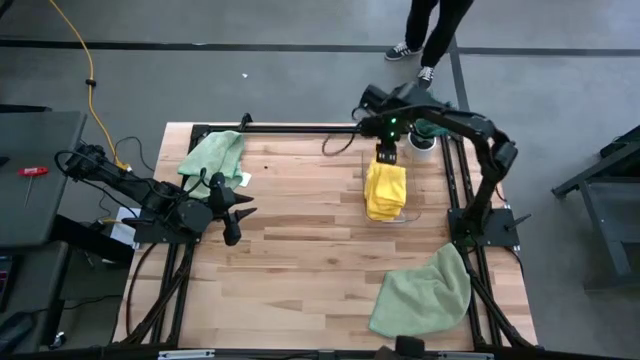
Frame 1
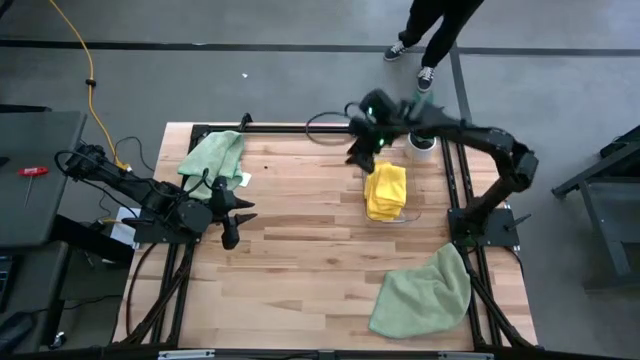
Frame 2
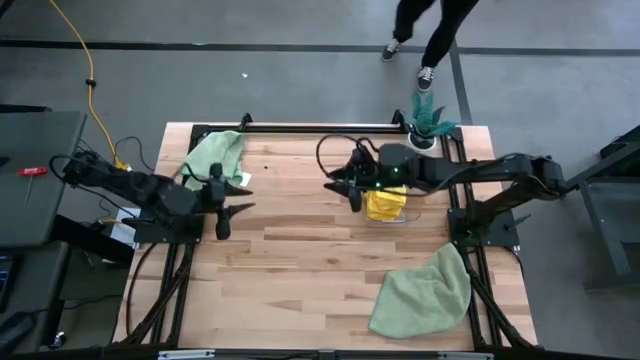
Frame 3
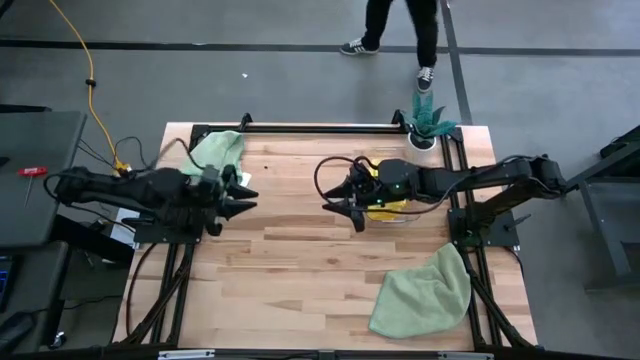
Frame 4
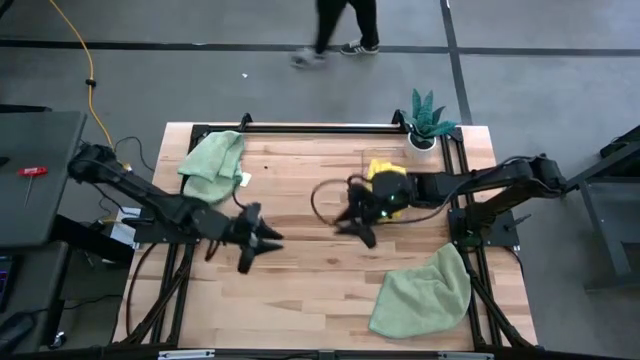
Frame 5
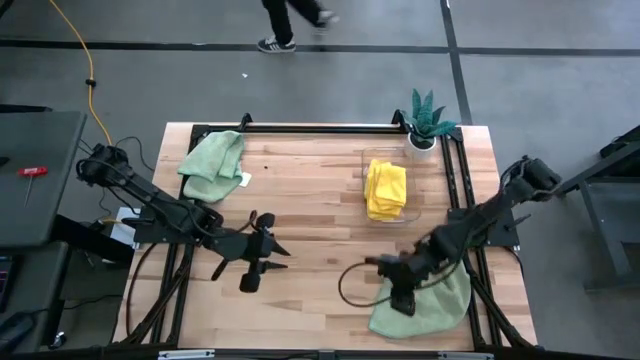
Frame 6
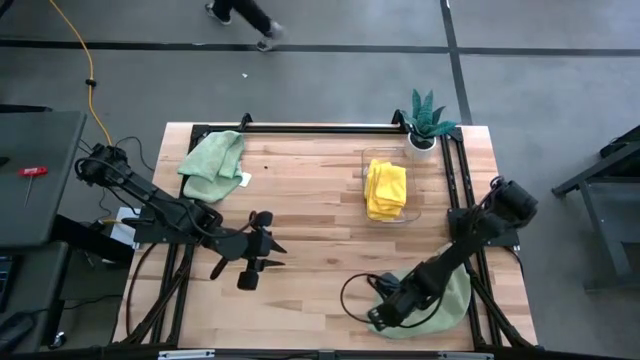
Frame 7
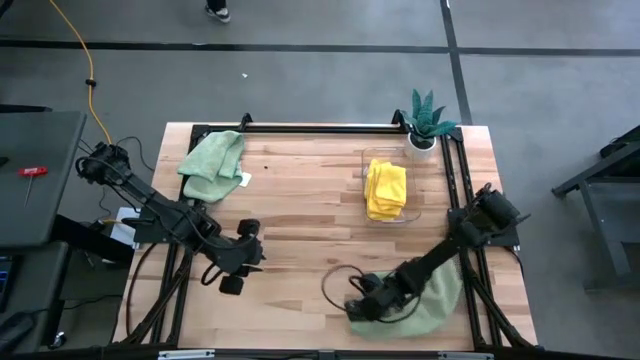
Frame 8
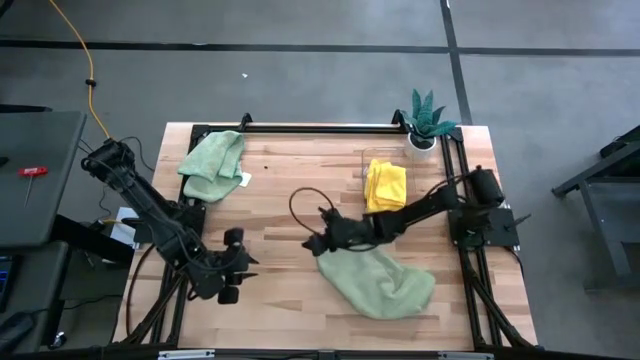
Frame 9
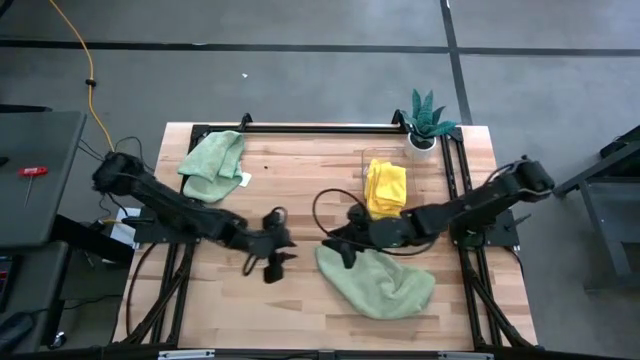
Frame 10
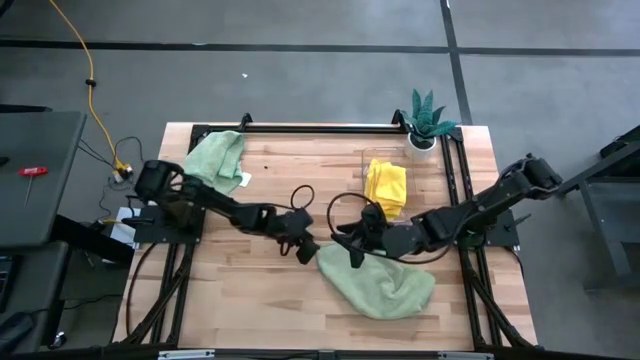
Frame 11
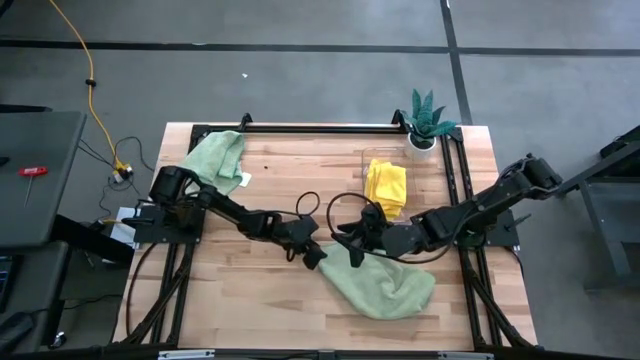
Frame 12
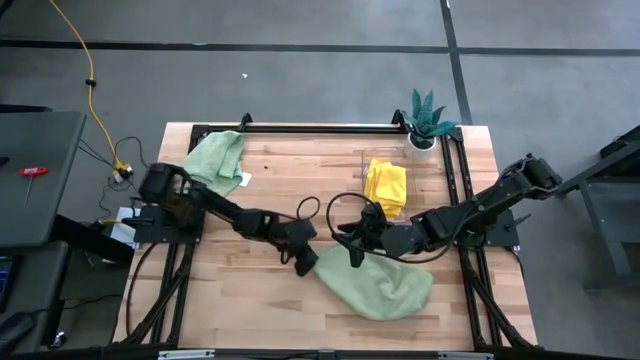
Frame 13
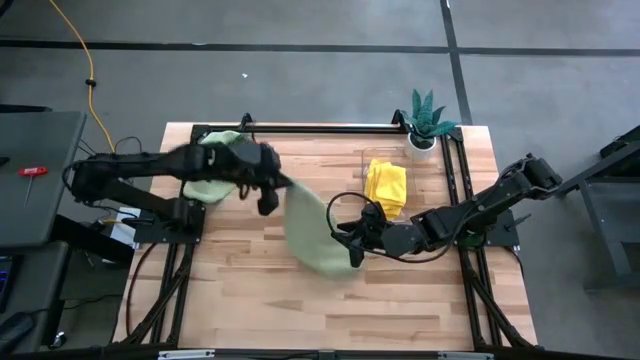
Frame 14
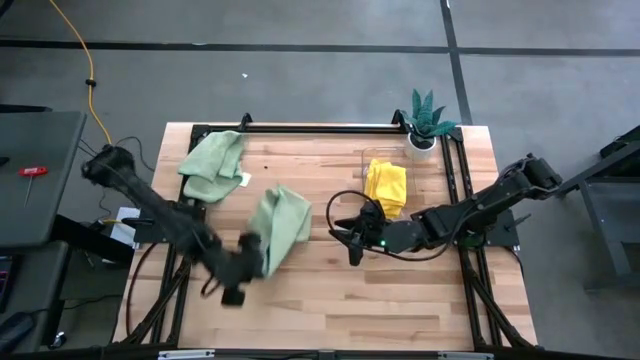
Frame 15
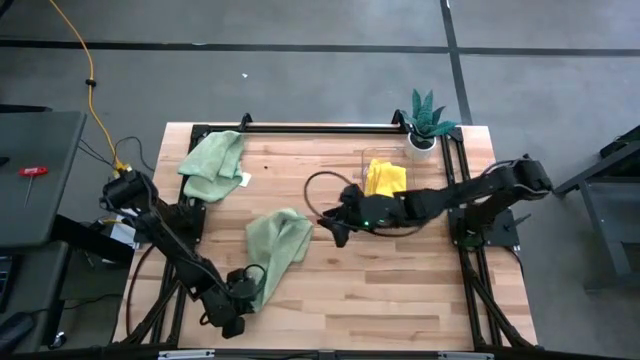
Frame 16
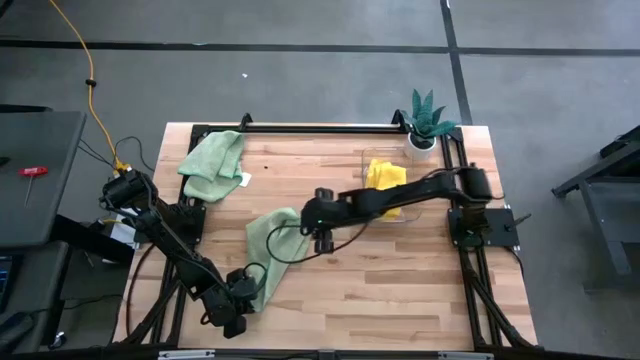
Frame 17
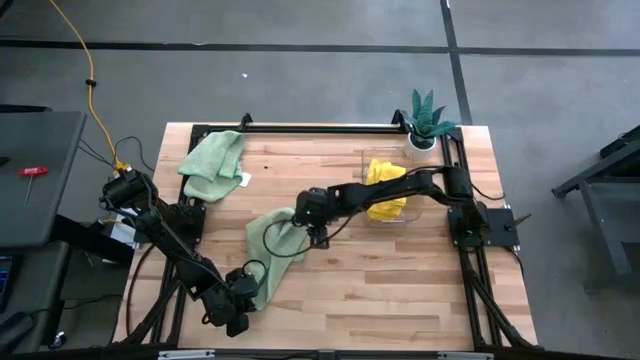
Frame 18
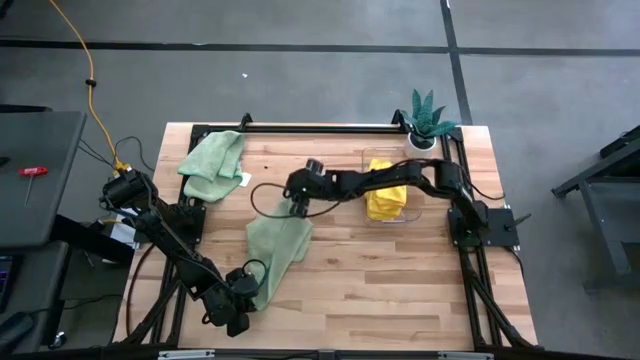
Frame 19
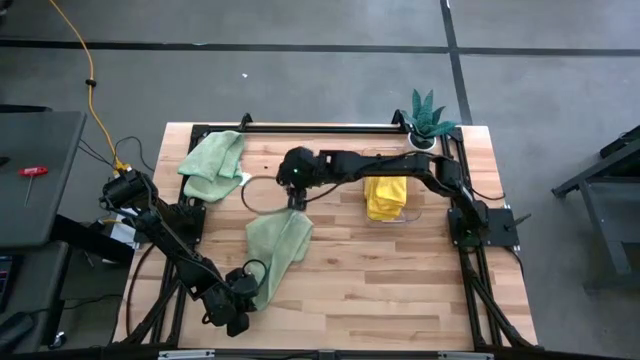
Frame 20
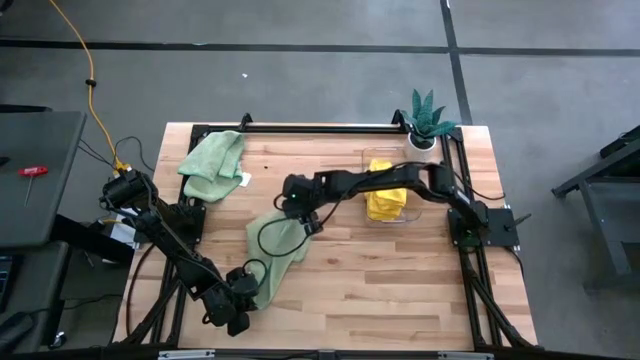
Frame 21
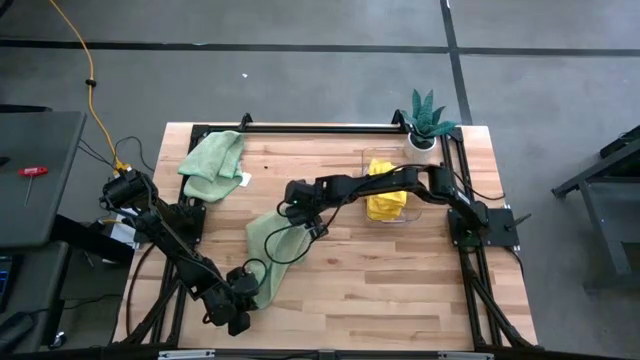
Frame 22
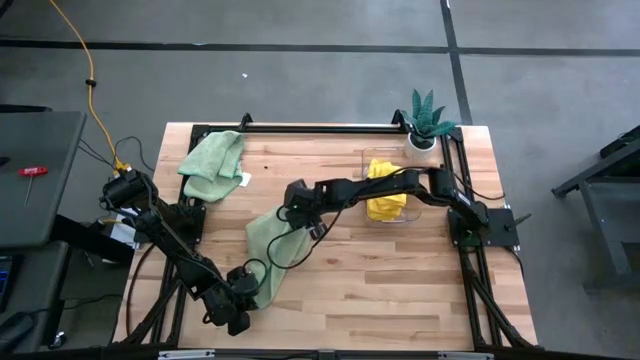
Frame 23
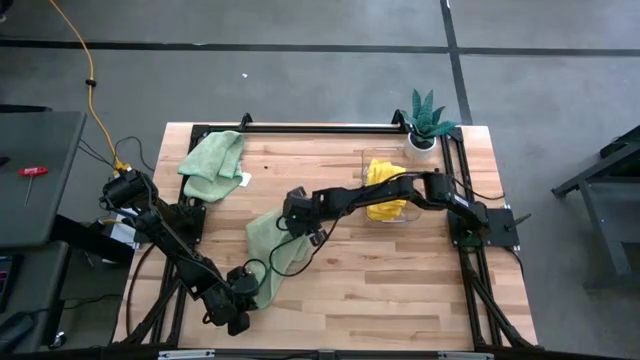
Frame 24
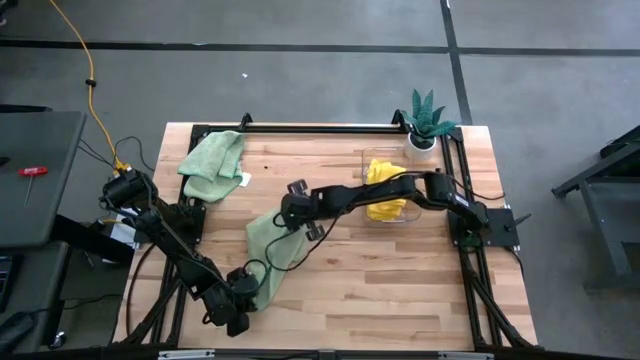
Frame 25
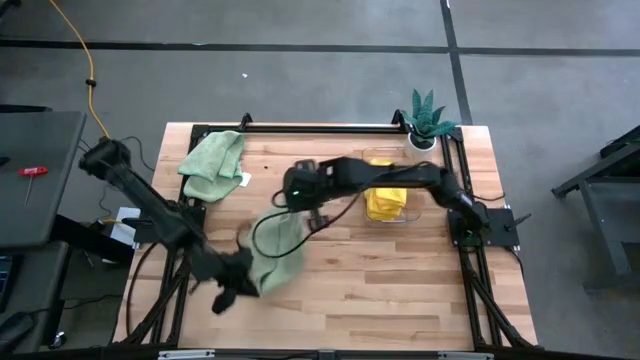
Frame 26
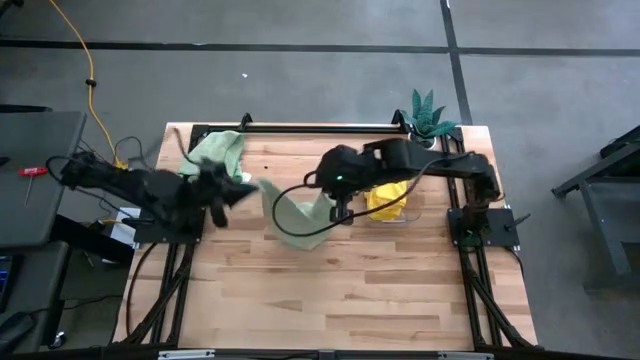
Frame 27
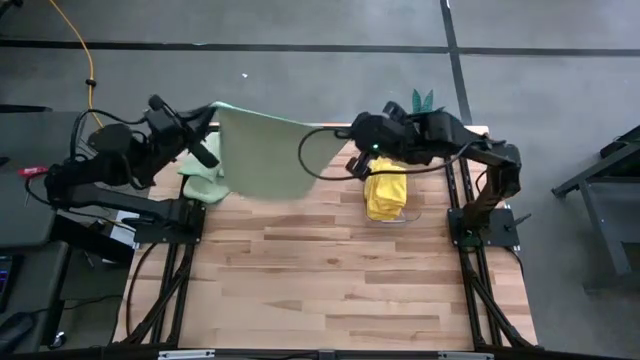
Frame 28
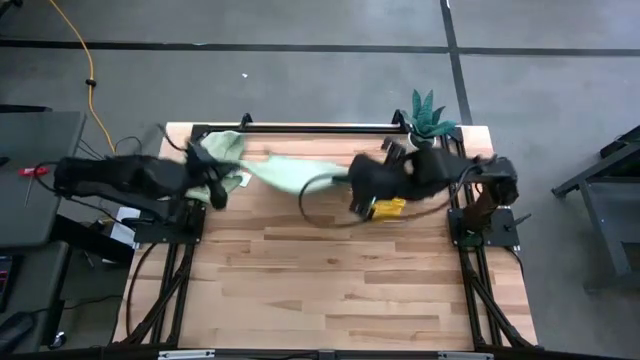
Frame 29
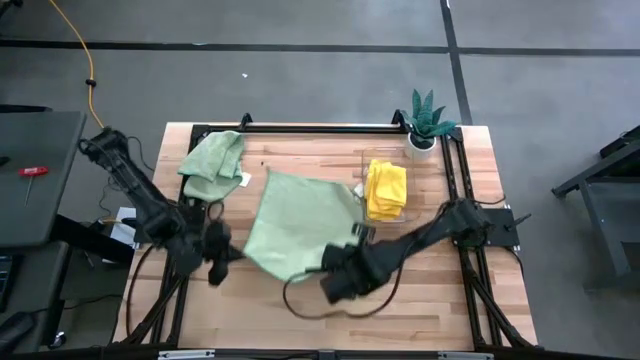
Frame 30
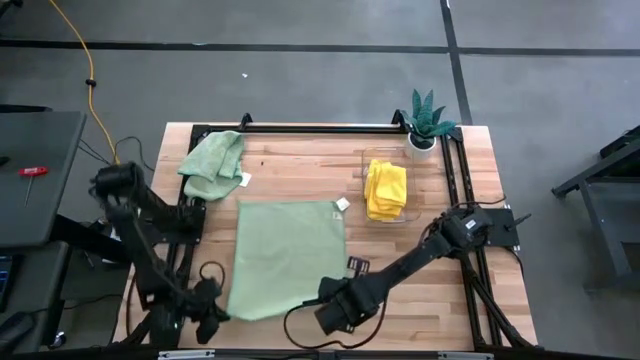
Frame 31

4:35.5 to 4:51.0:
Task: Fold microfiber towels
Fold the bottom green microfiber towel

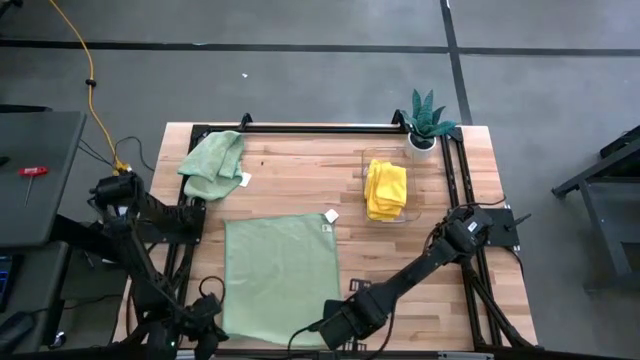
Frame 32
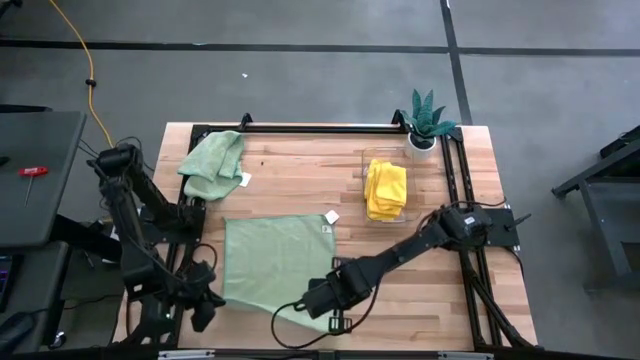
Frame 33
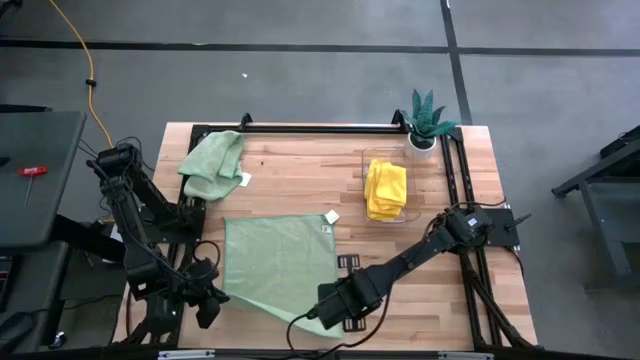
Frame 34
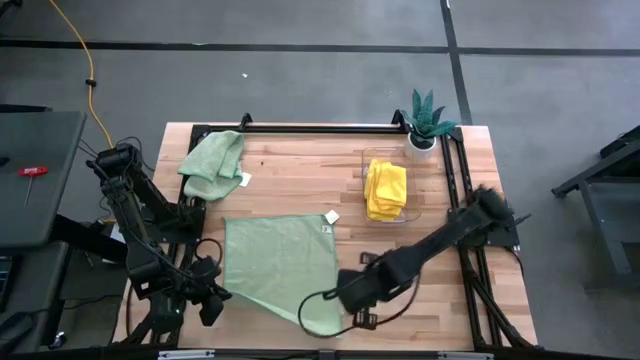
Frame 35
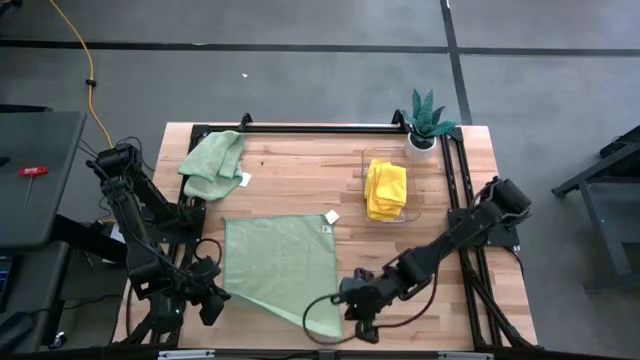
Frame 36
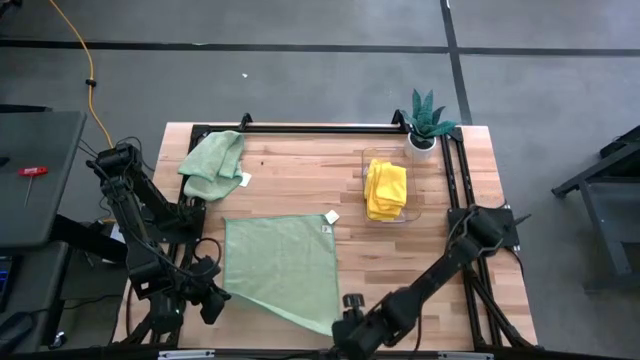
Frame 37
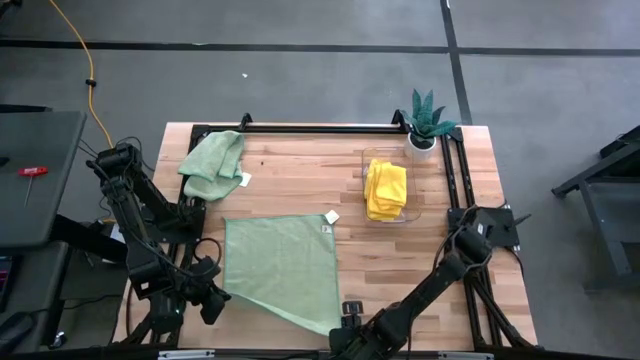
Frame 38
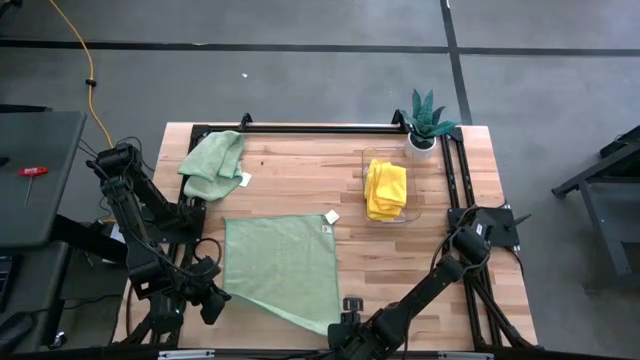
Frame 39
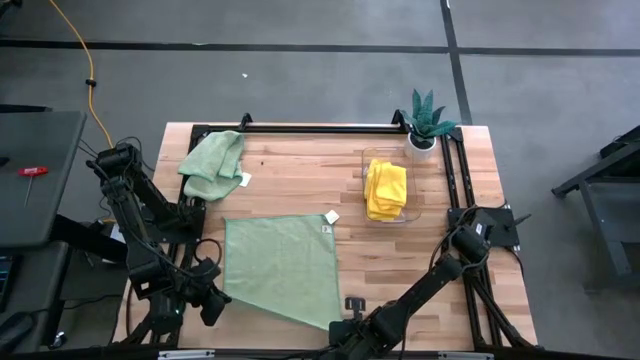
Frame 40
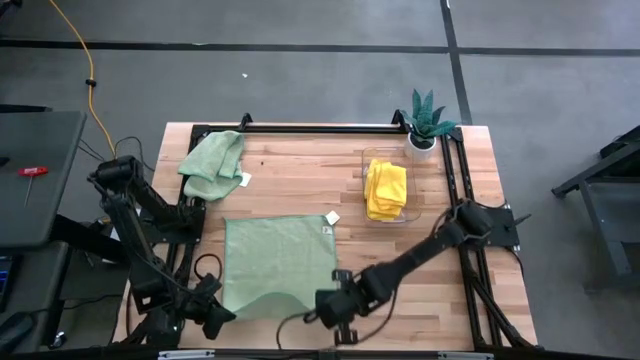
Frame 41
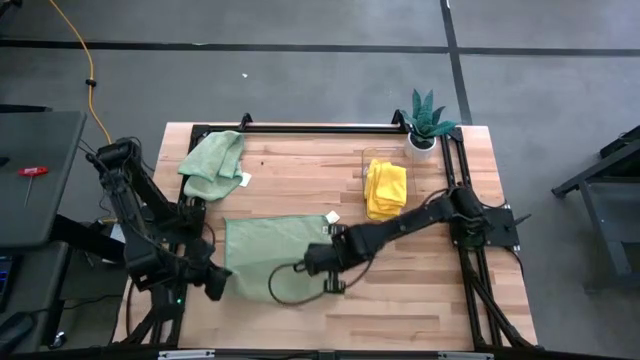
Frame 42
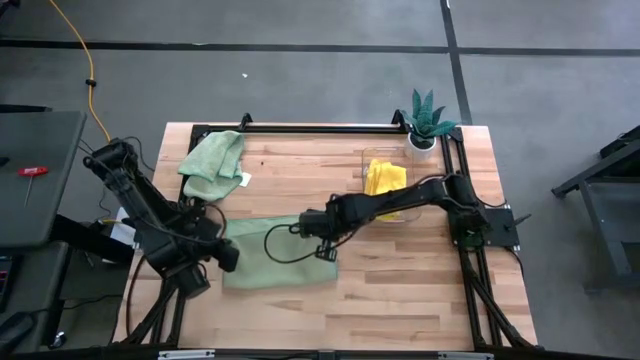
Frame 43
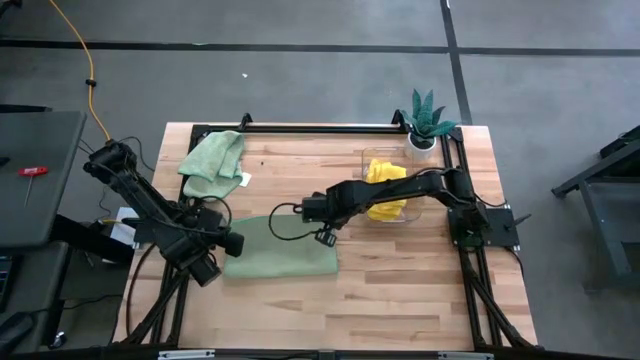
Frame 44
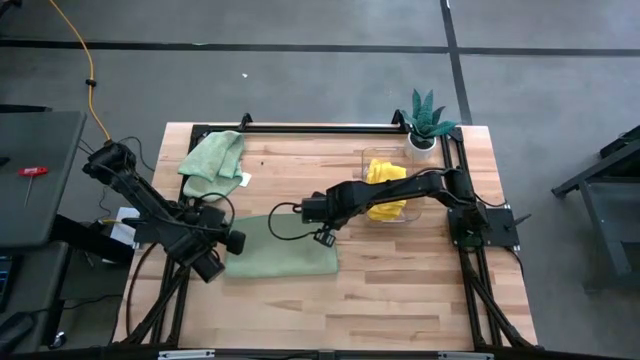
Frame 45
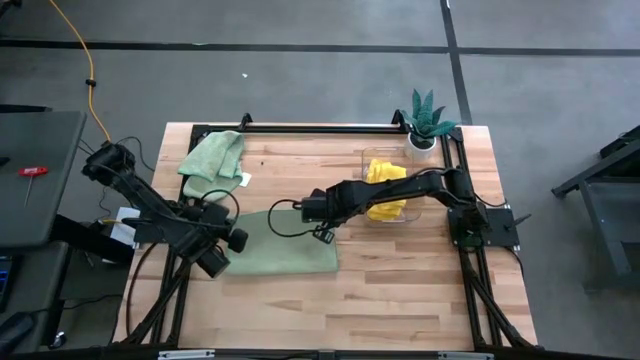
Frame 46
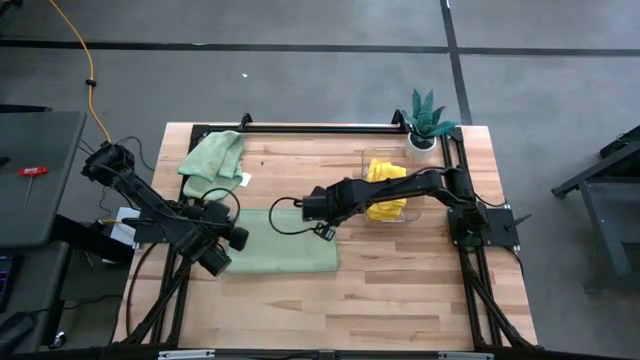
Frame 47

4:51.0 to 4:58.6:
Fold the bottom green microfiber towel
